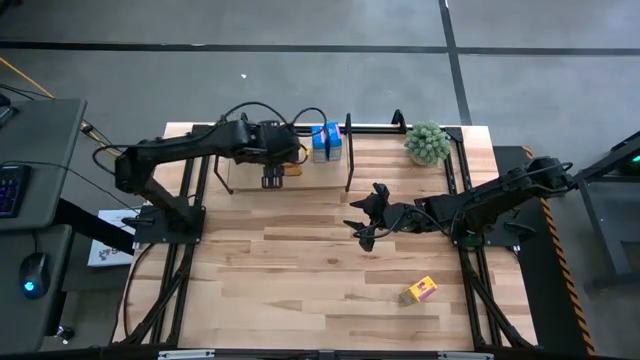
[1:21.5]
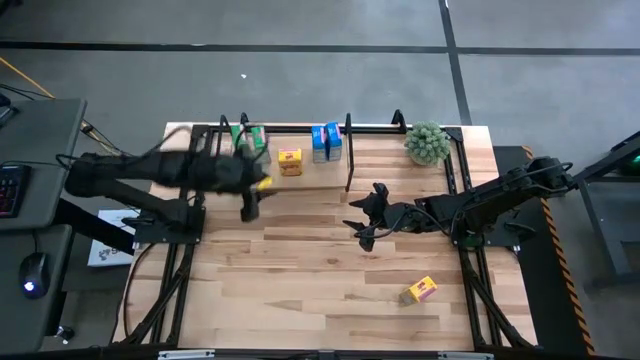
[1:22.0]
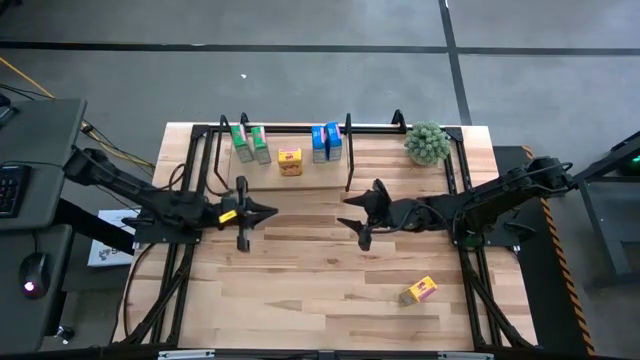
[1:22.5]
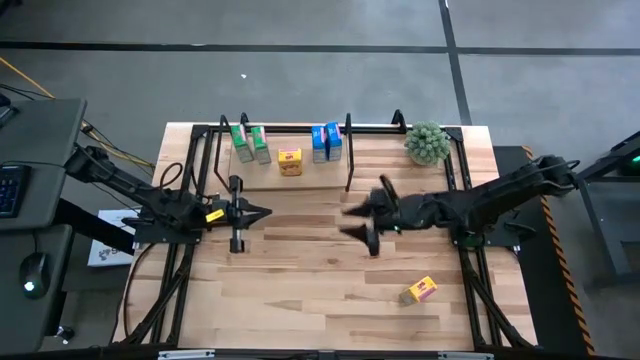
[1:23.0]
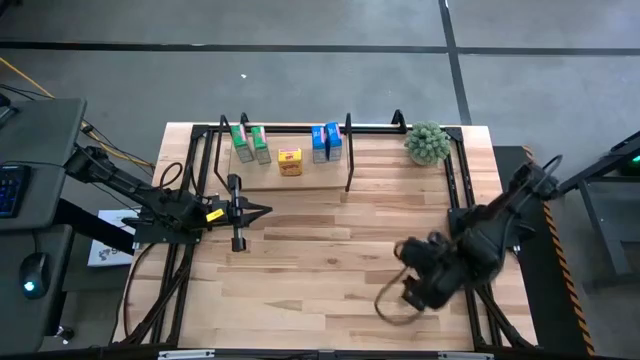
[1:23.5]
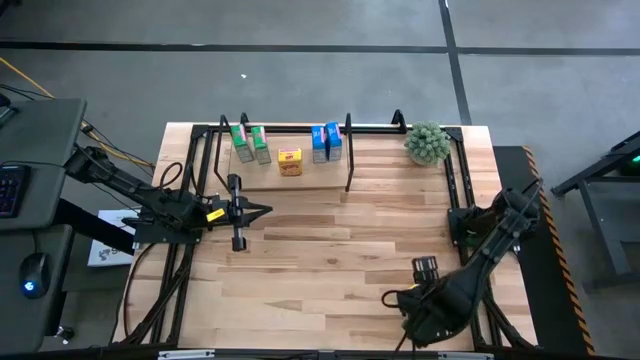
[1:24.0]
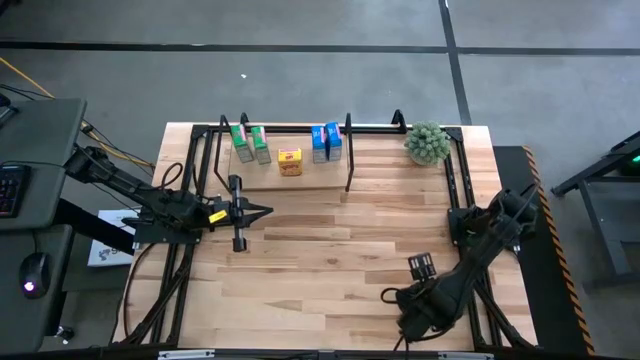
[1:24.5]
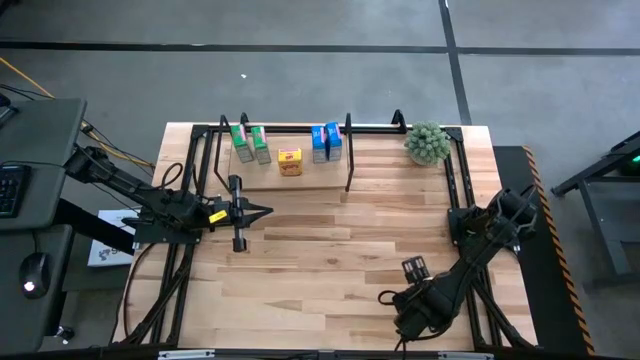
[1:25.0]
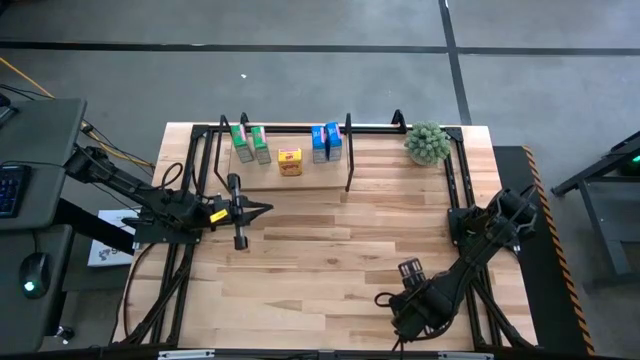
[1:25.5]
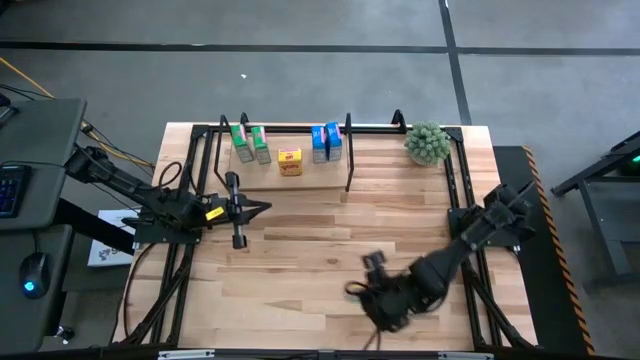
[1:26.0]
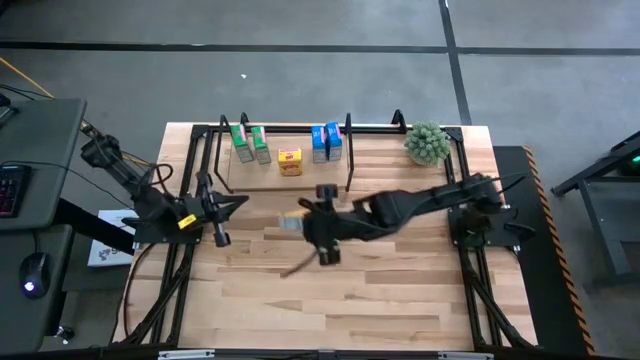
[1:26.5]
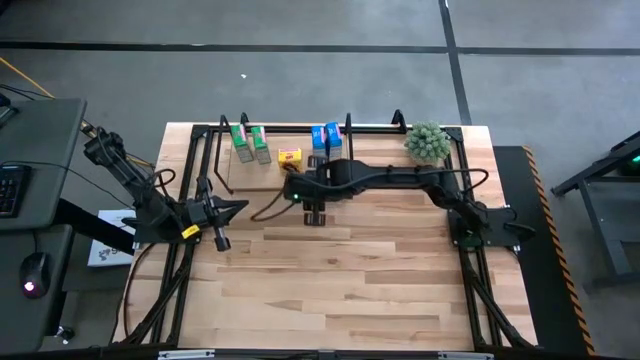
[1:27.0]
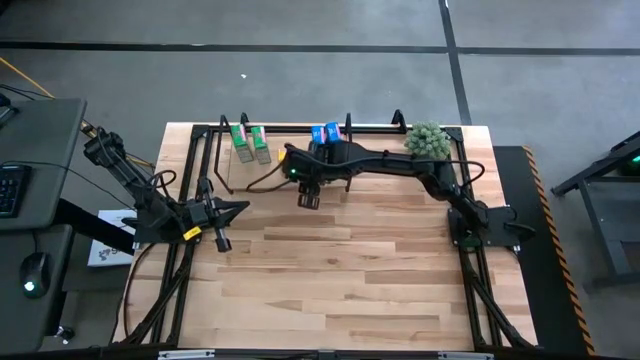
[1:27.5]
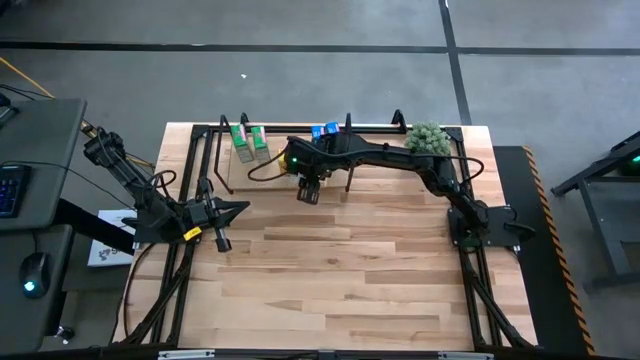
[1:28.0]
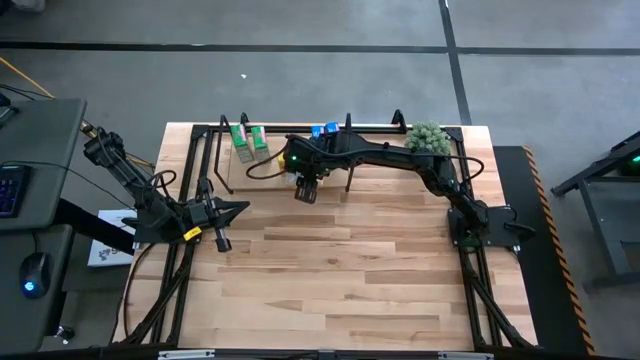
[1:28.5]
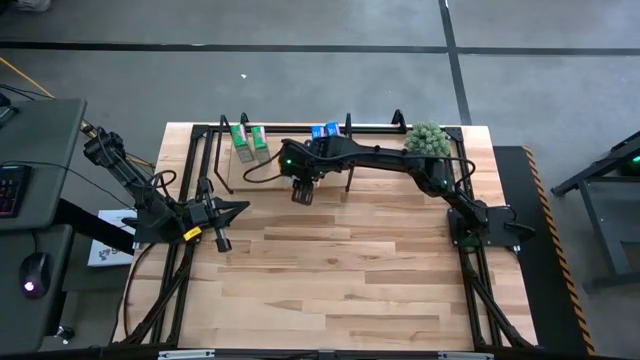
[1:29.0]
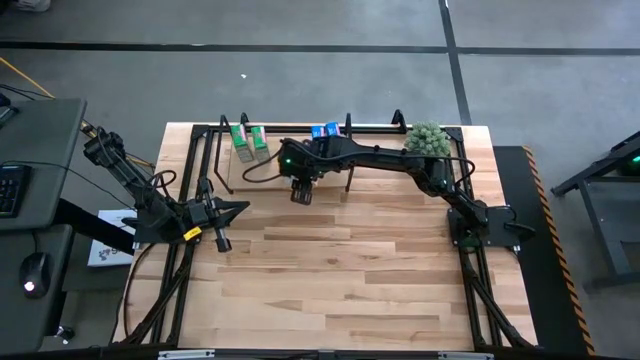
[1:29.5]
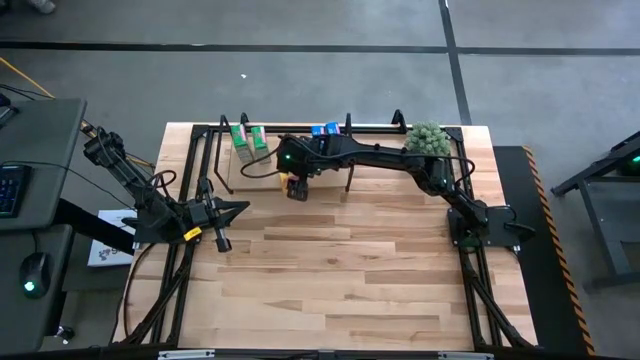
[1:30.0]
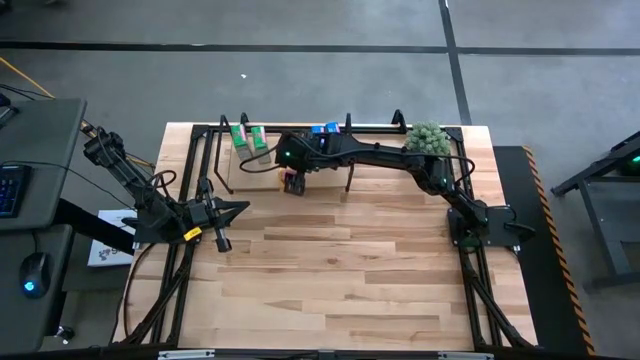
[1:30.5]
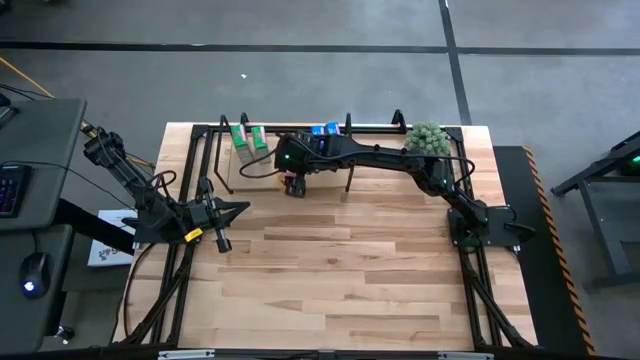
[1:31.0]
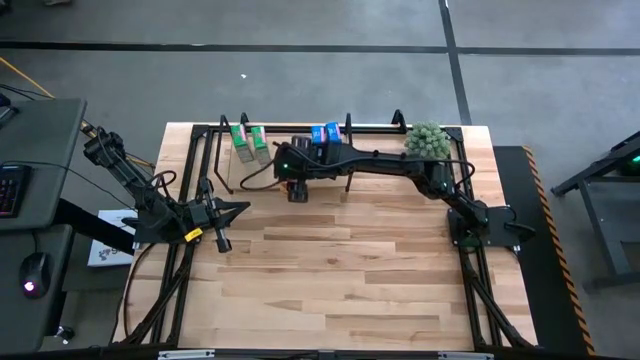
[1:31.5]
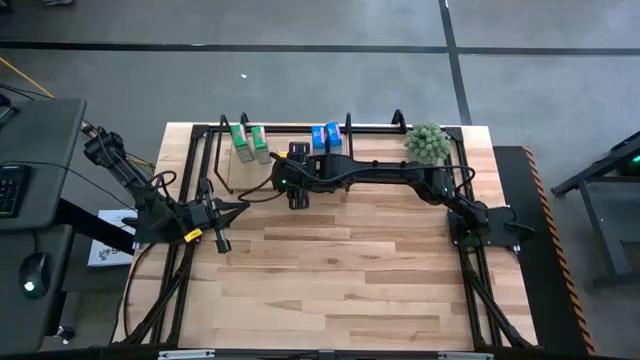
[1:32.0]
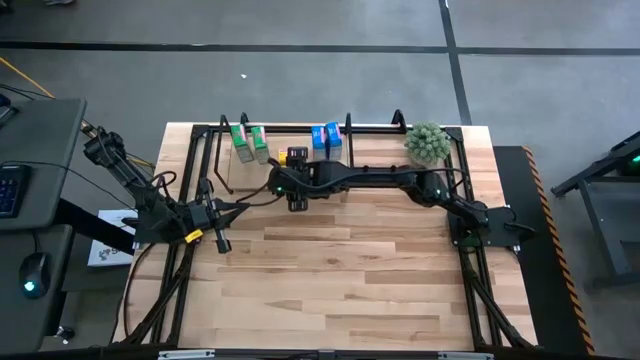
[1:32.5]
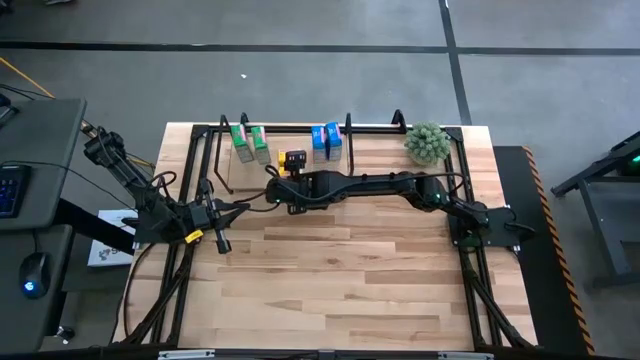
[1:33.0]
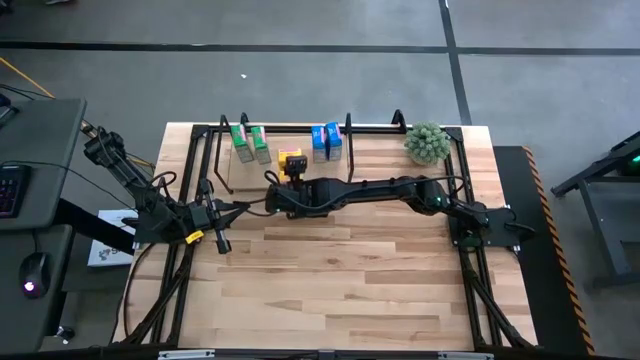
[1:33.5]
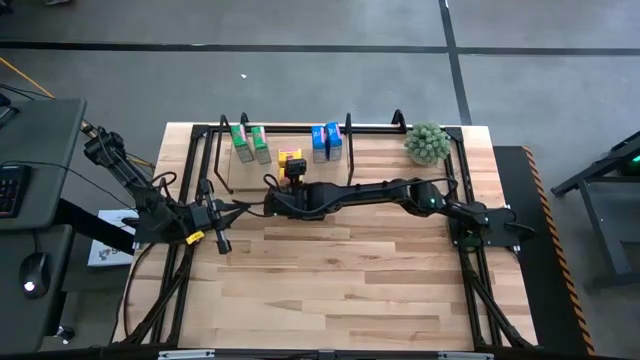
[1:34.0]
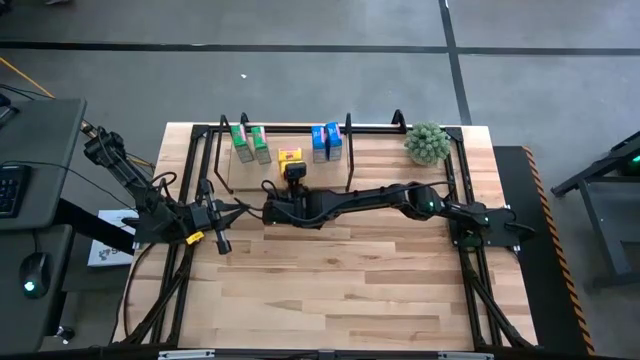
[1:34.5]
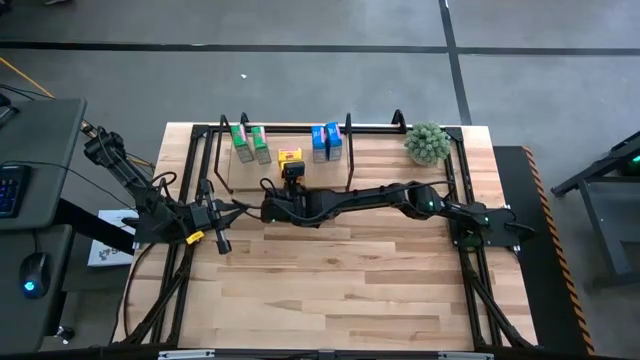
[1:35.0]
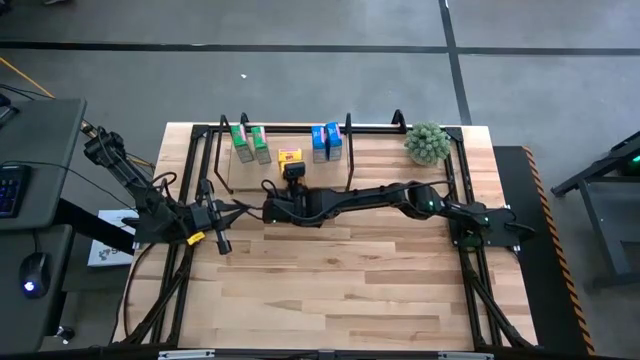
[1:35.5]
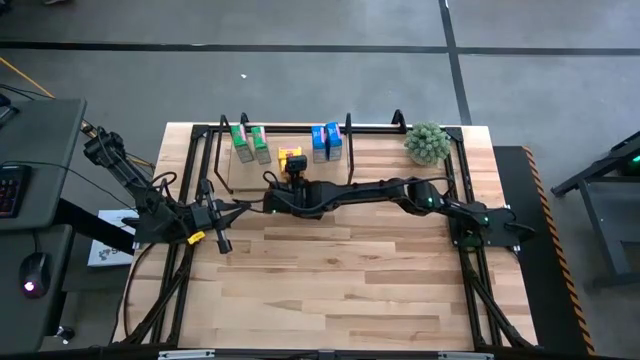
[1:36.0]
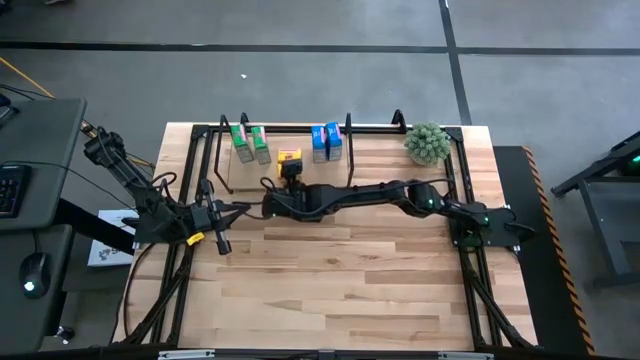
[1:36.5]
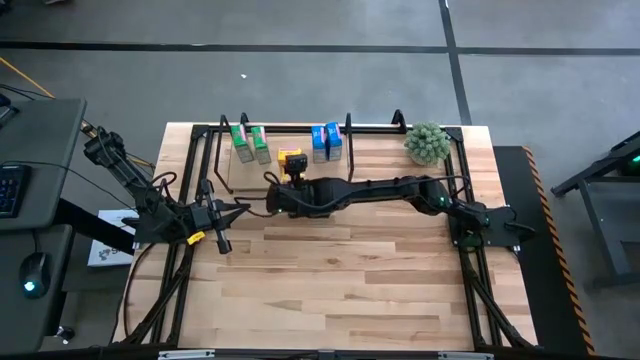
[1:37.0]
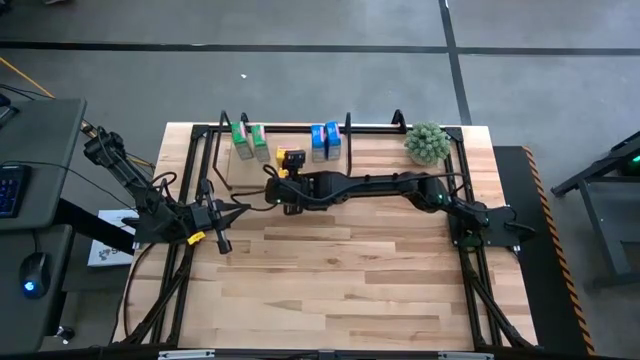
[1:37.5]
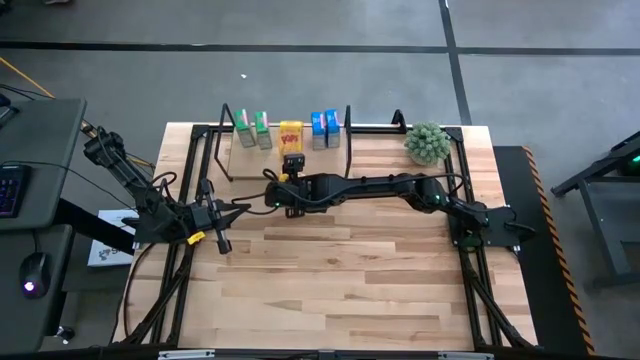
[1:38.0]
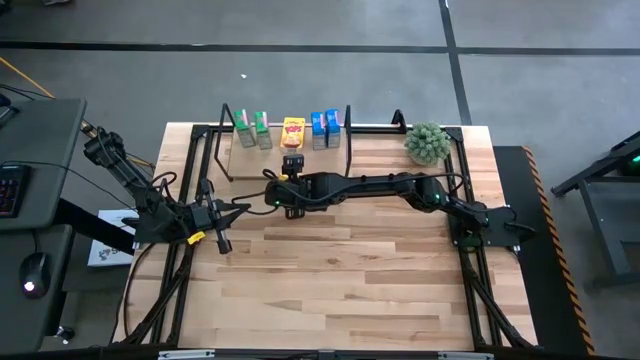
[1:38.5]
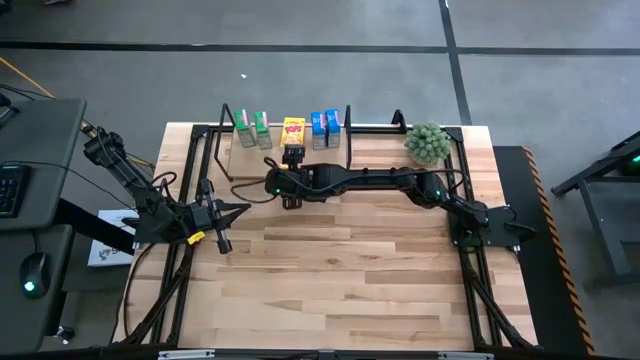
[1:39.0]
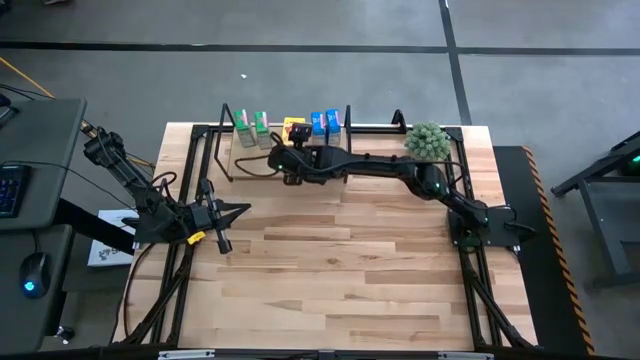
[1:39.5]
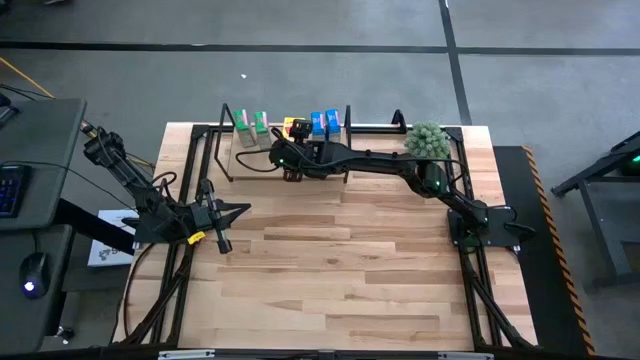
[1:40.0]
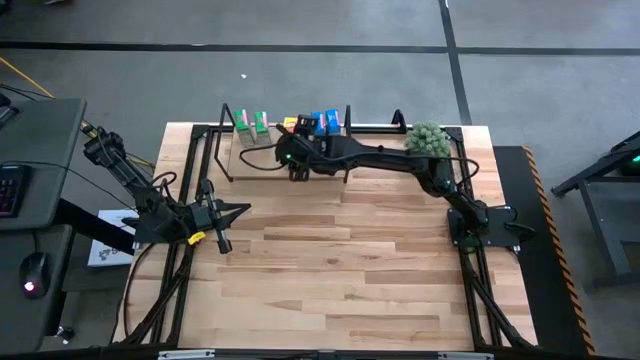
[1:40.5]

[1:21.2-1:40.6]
Task: Stack cereal on shelf
Put the yellow cereal box on the shelf aligned with the yellow cereal box

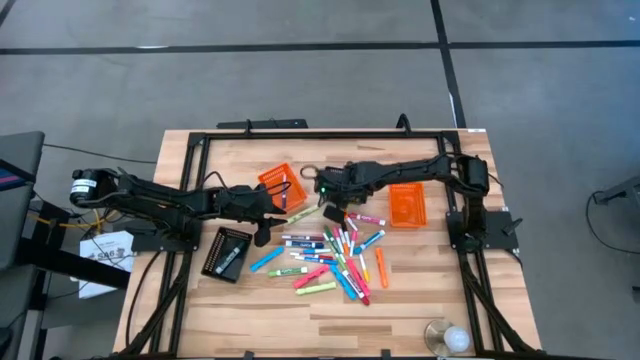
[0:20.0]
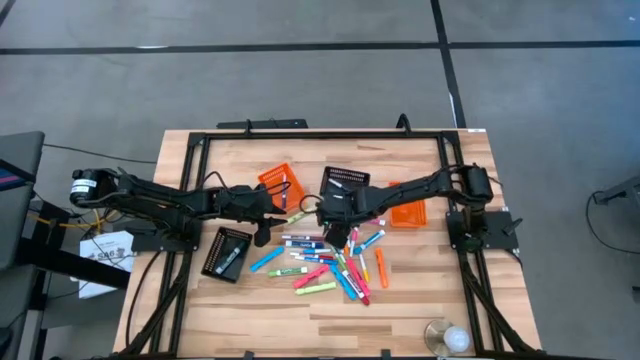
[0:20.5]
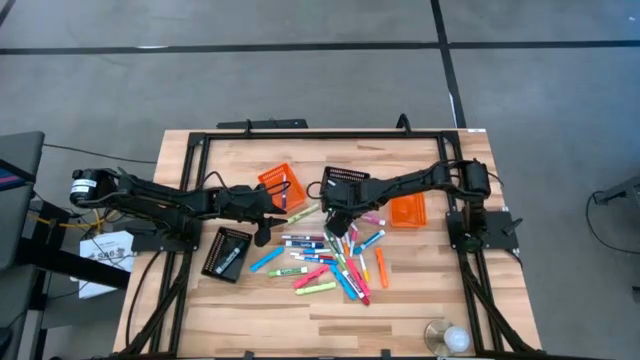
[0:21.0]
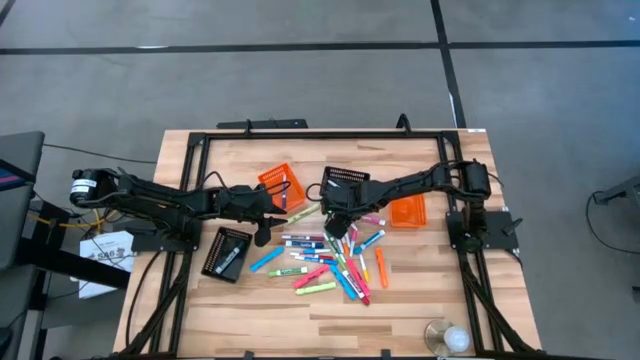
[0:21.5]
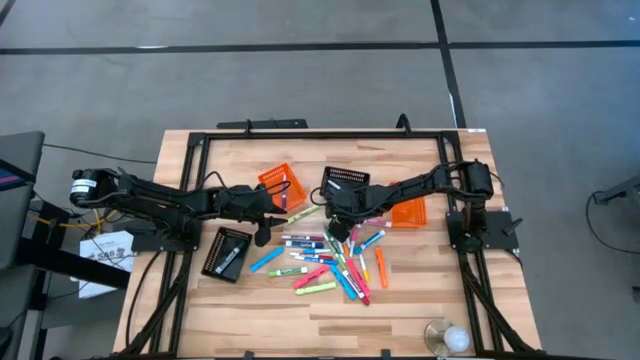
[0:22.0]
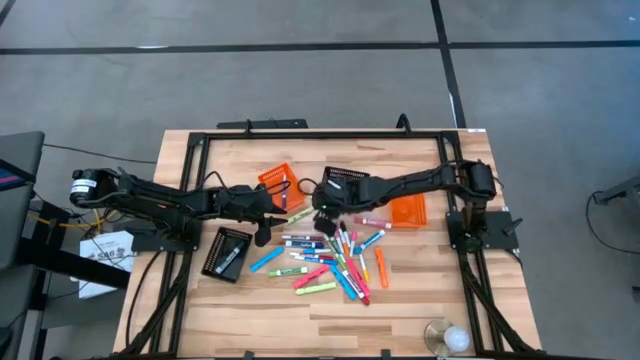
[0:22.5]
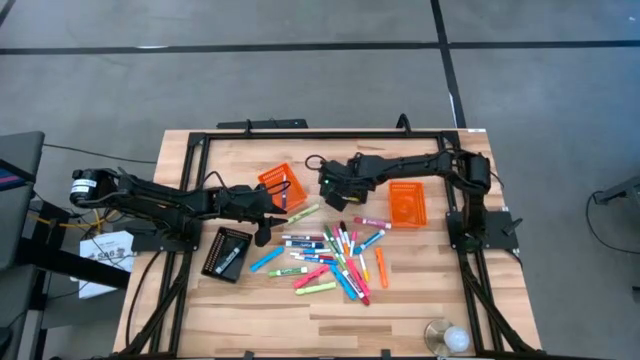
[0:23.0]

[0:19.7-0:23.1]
Task: Pick & Place Markers
Put the orange highlighter into the right black bin
